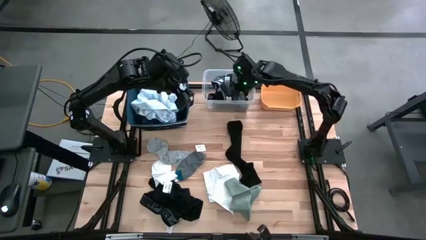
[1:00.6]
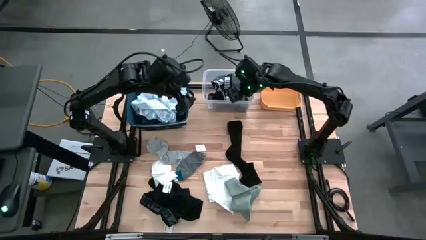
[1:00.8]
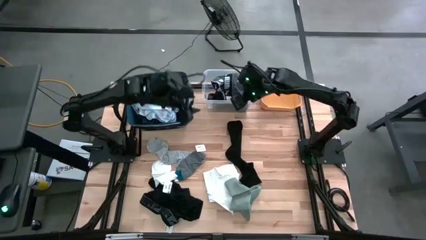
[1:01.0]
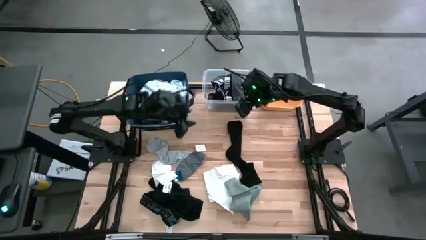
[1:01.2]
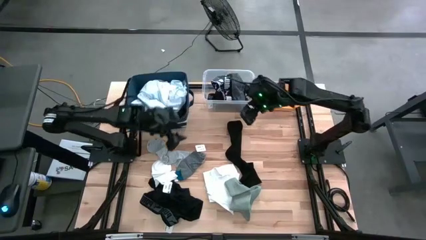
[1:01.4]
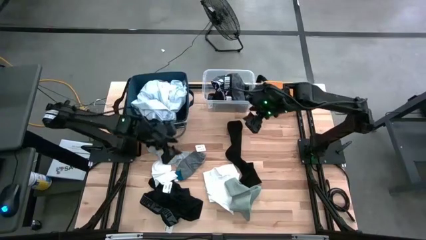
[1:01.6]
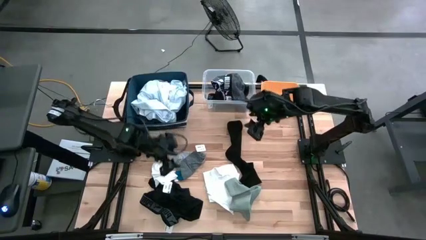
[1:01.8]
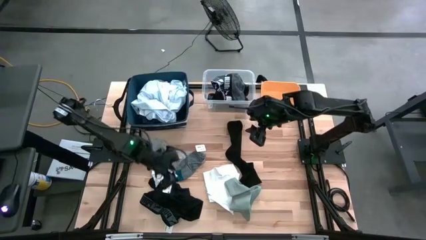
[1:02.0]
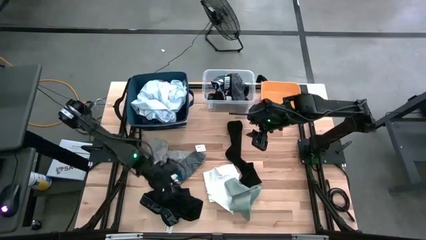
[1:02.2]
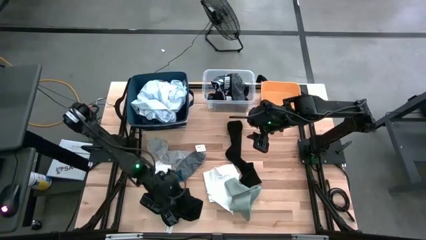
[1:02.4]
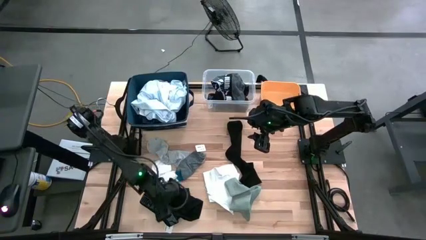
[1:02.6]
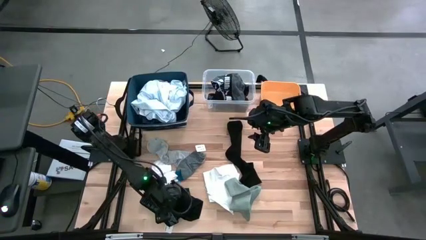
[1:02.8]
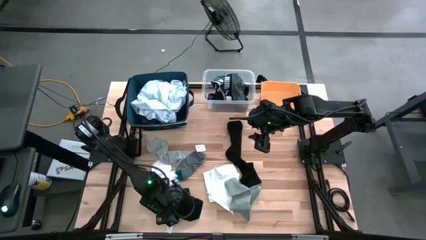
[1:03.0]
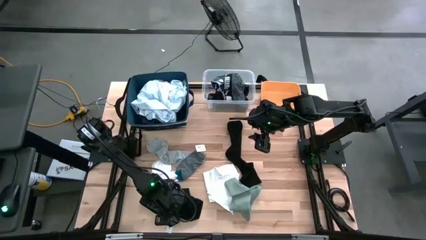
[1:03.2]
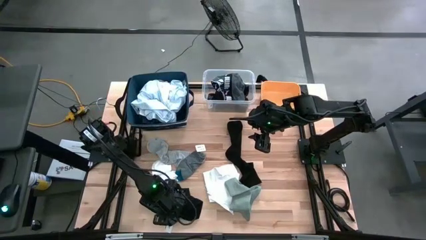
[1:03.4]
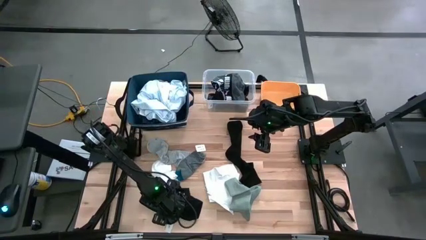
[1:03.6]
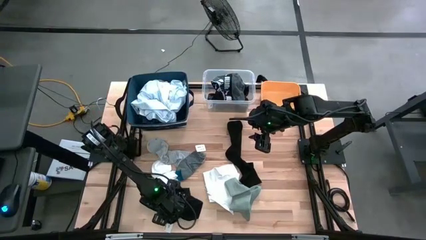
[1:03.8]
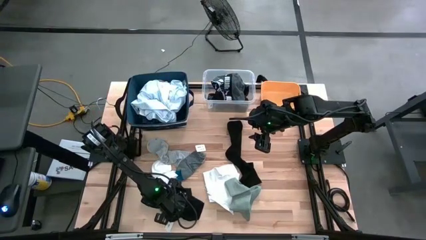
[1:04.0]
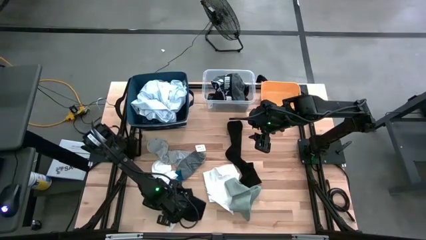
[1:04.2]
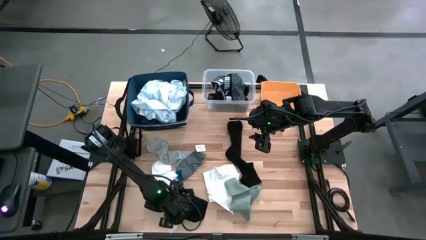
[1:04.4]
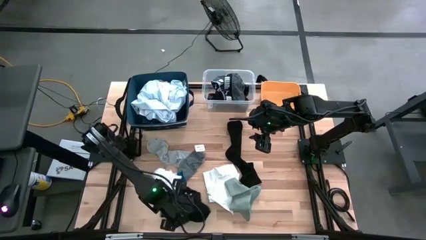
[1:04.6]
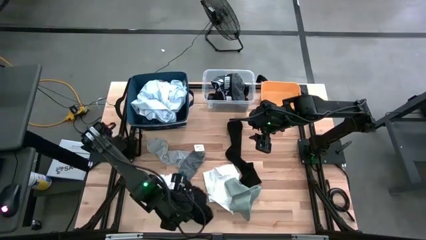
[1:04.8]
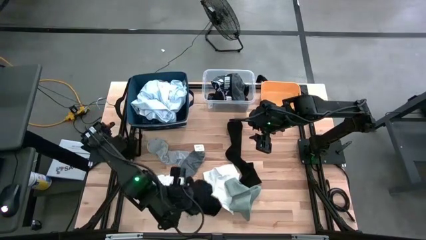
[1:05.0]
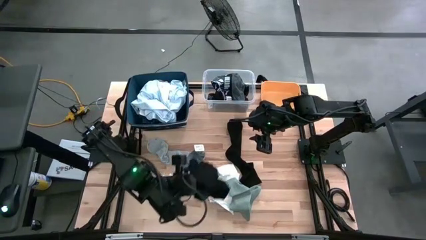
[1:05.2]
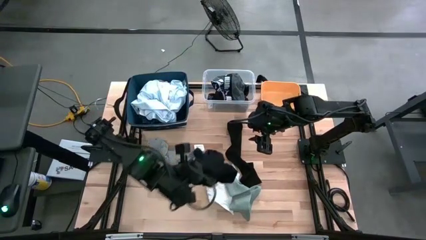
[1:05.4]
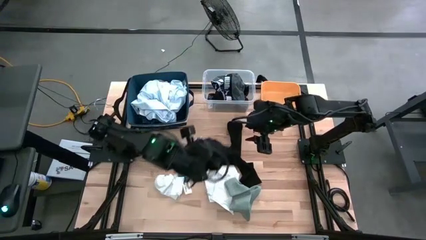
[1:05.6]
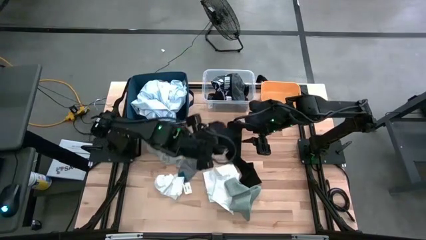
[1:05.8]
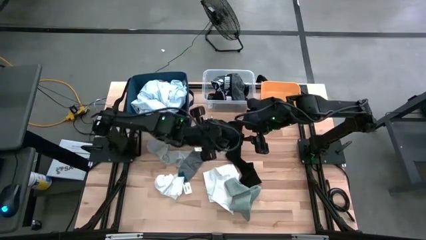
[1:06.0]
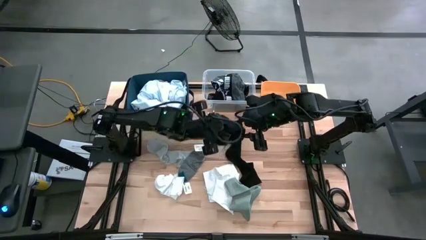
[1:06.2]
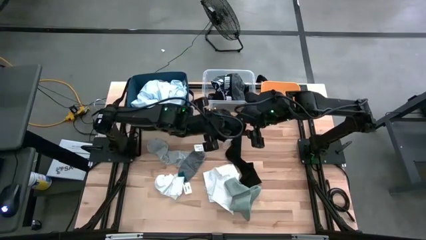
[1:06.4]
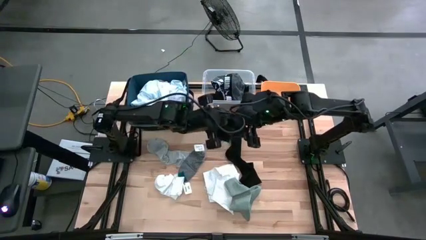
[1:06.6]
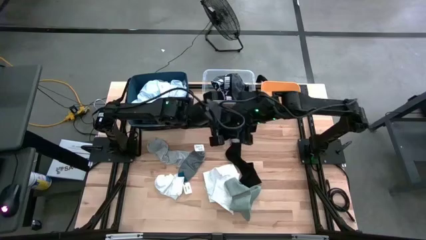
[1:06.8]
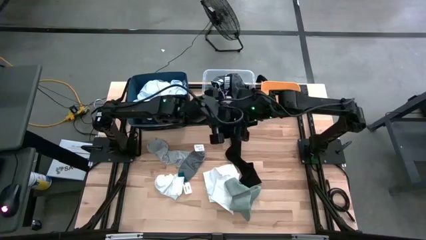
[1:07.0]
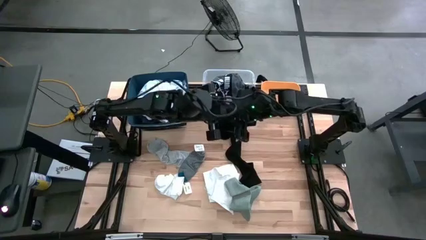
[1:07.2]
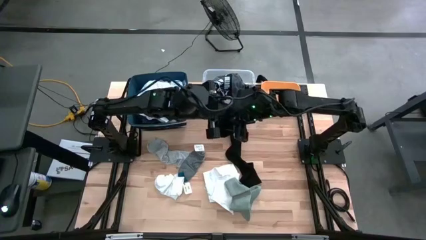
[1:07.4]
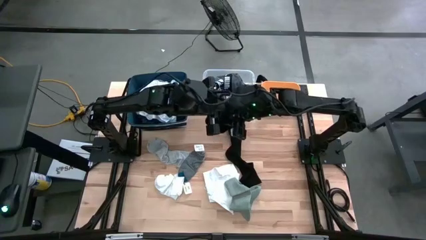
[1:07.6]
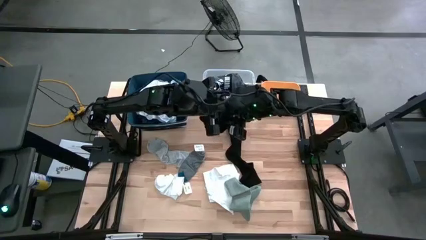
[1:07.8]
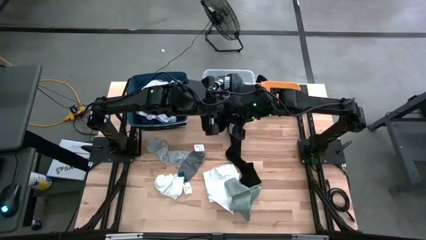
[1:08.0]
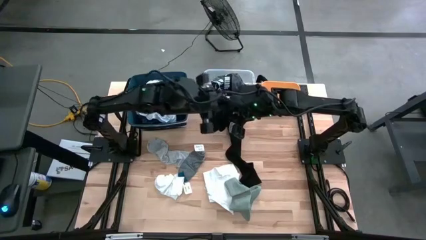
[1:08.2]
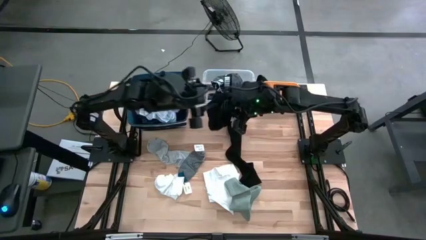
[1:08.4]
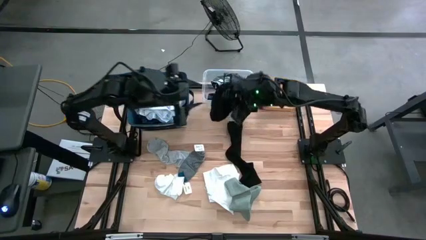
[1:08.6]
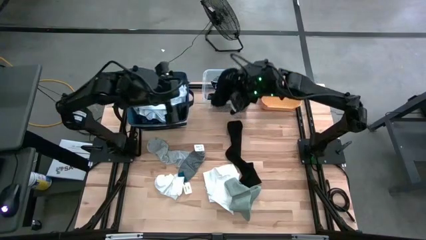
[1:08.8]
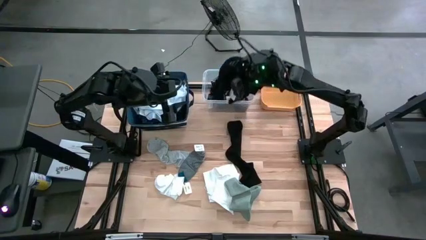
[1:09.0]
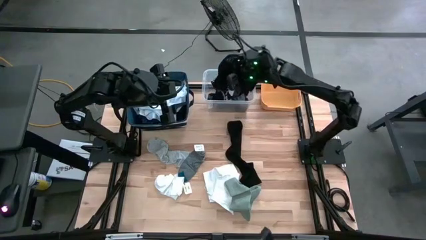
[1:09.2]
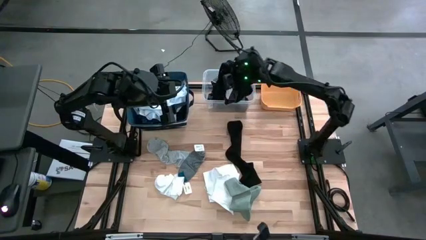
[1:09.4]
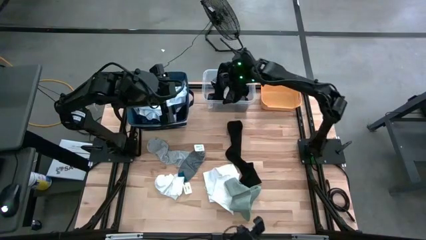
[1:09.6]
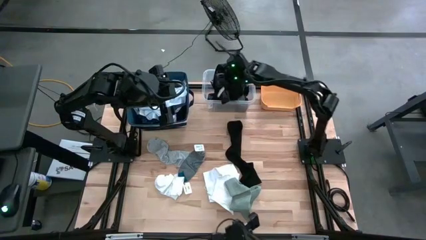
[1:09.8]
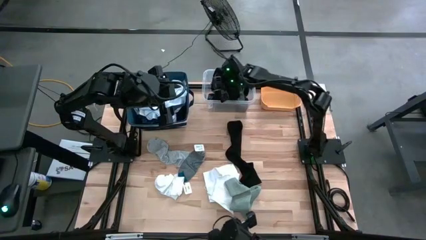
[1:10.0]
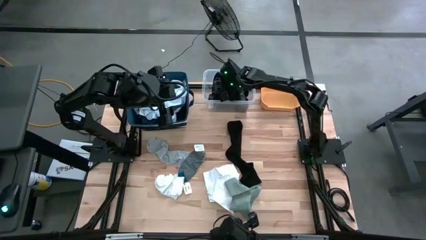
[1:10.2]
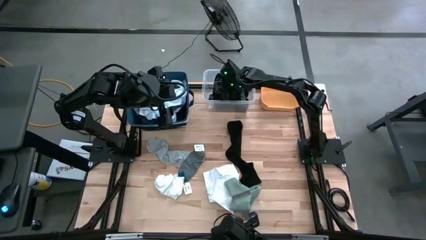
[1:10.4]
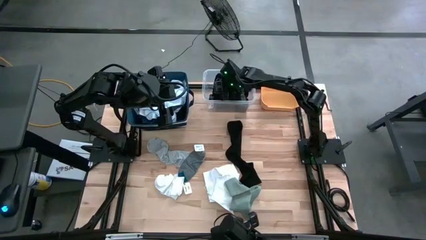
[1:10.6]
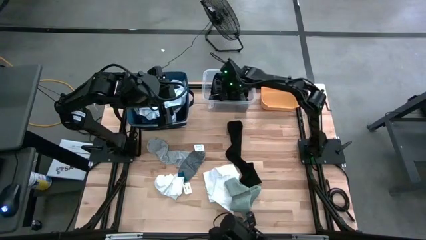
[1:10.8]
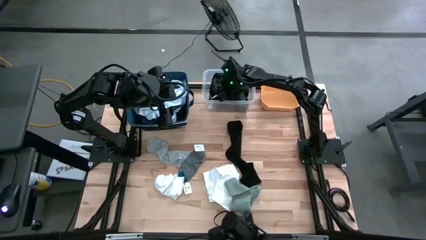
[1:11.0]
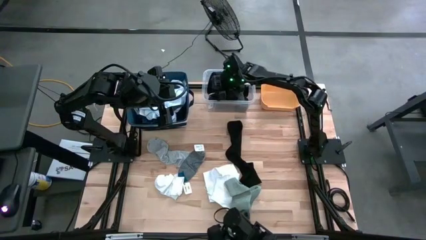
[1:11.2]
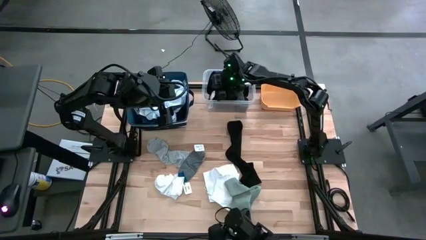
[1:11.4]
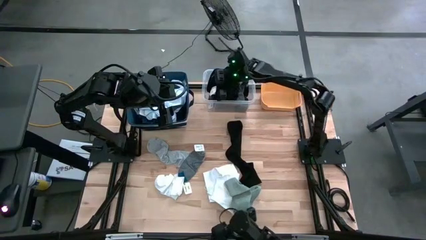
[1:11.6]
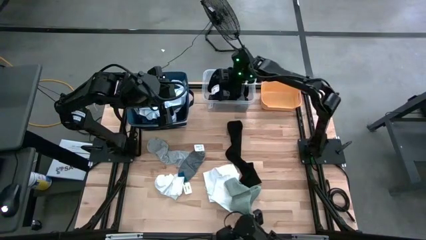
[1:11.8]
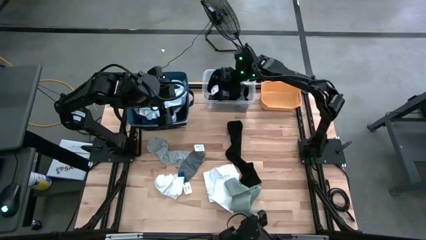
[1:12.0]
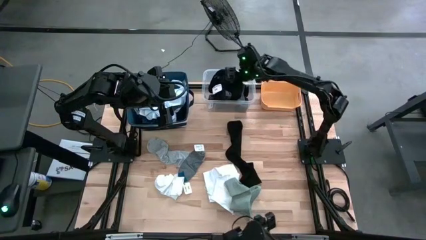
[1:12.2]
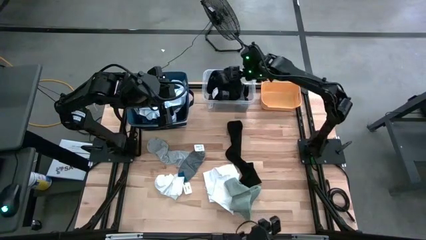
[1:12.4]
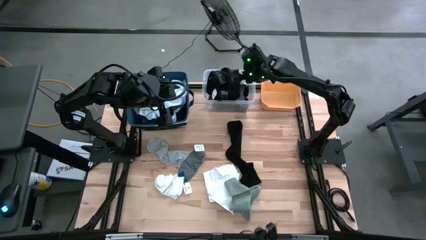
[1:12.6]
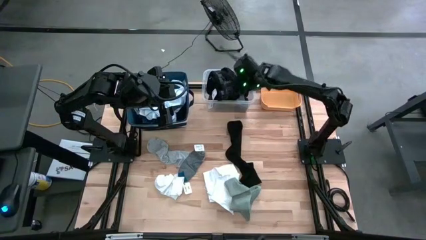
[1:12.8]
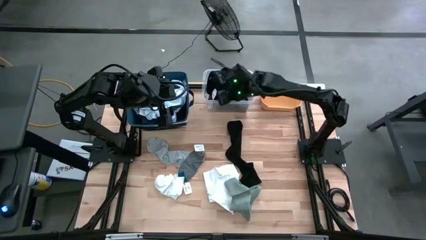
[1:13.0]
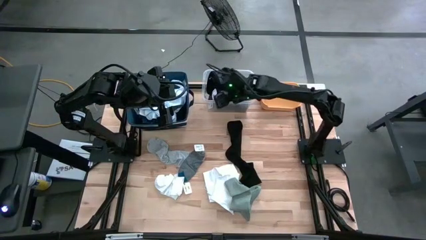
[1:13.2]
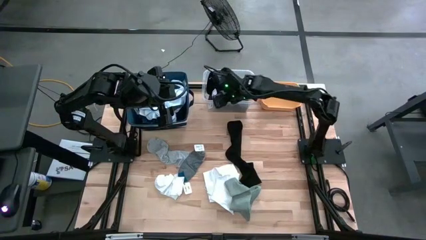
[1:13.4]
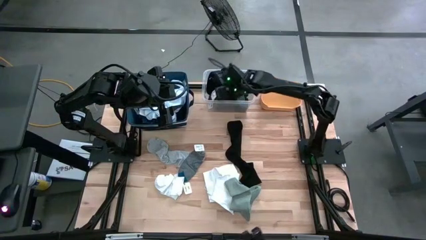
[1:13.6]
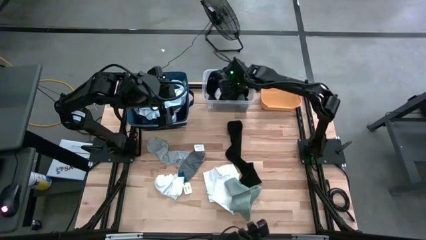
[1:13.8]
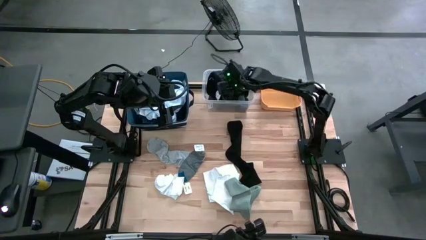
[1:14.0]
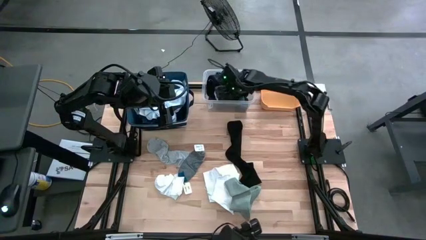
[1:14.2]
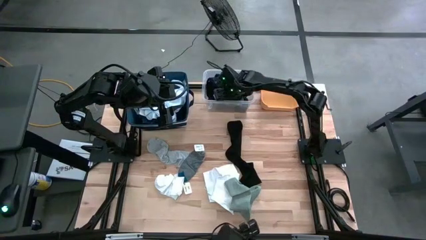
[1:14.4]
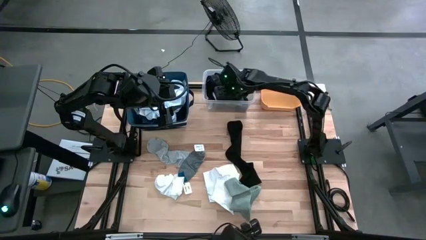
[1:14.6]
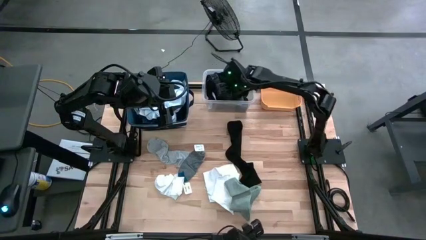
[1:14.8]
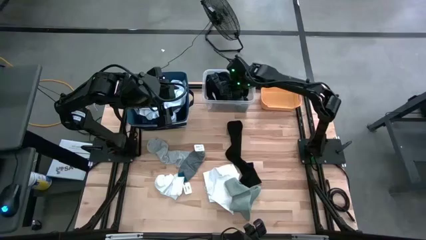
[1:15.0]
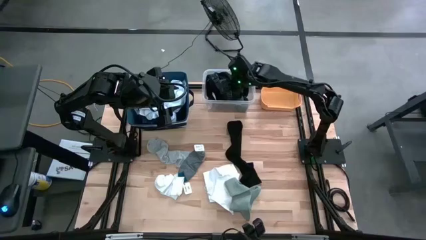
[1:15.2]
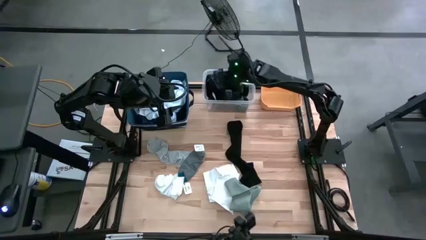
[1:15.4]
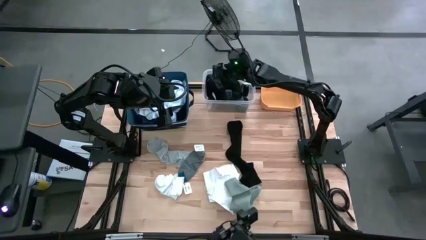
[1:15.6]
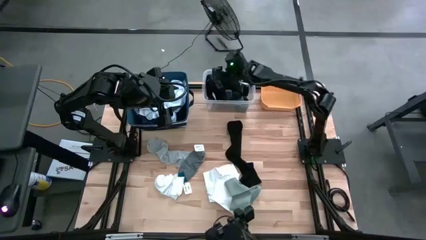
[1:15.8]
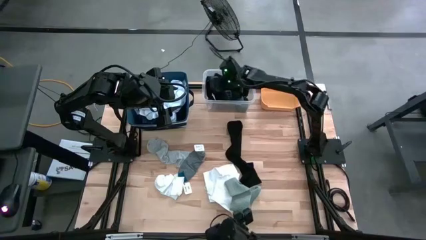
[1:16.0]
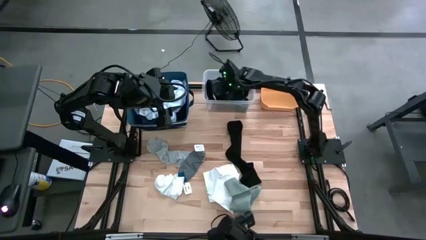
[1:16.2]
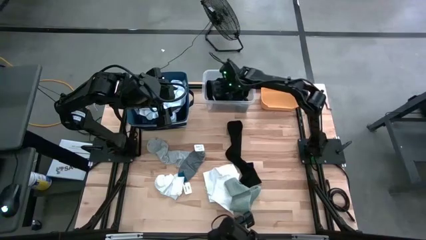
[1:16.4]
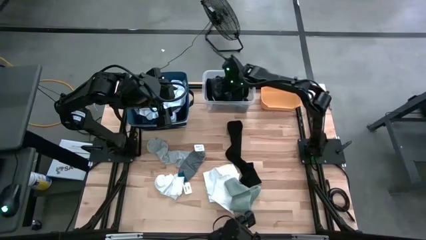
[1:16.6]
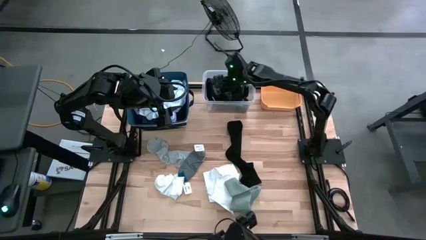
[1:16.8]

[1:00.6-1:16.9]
Task: Pick & Place Cloths
Put the black boxer short into the transparent bin
